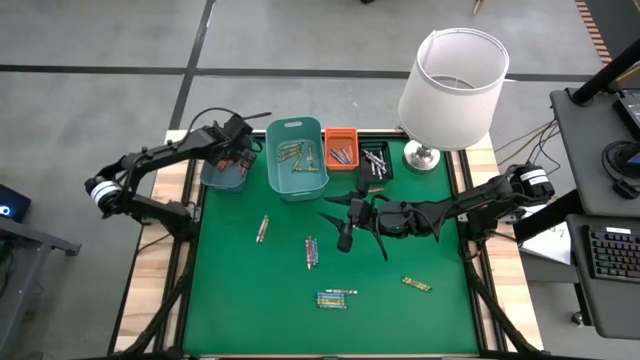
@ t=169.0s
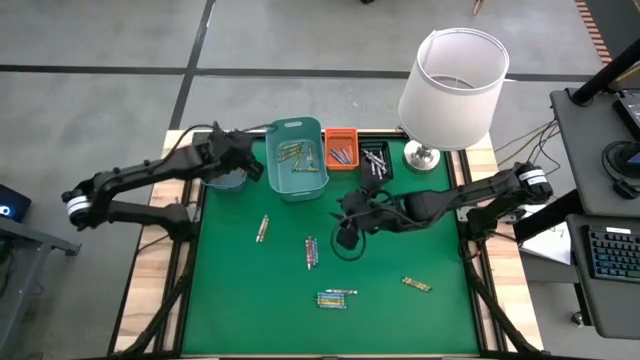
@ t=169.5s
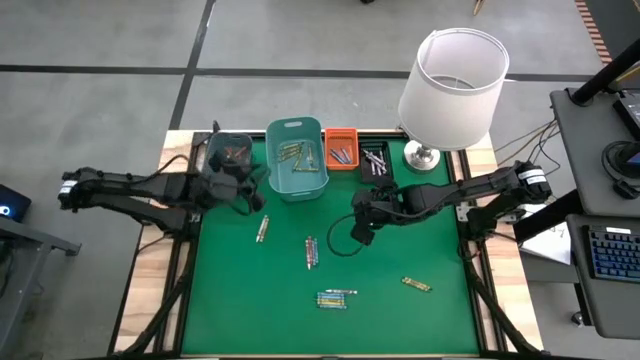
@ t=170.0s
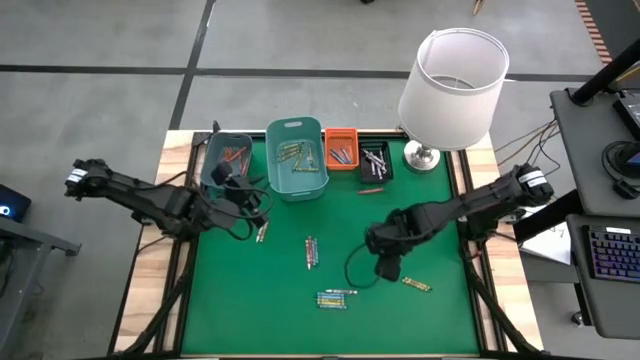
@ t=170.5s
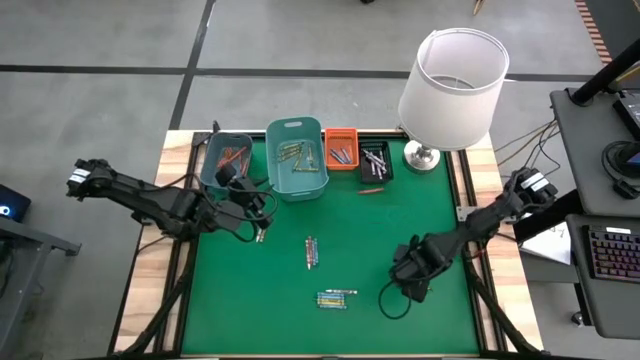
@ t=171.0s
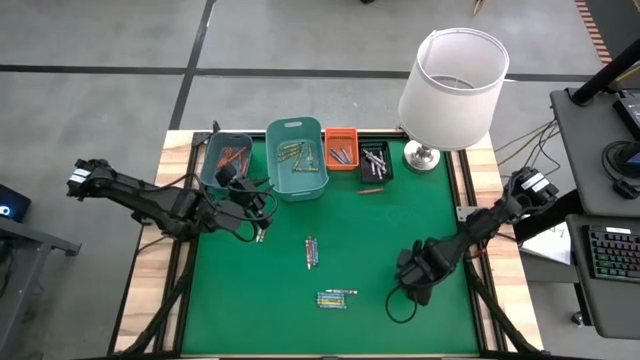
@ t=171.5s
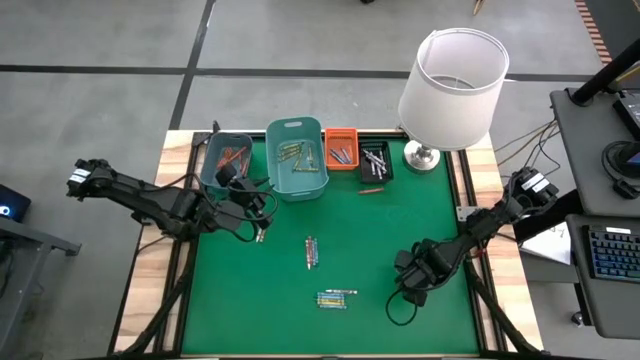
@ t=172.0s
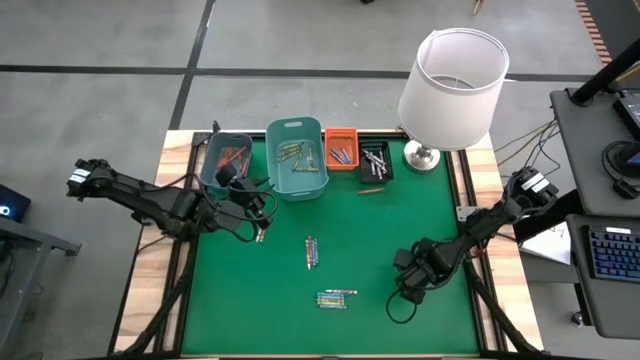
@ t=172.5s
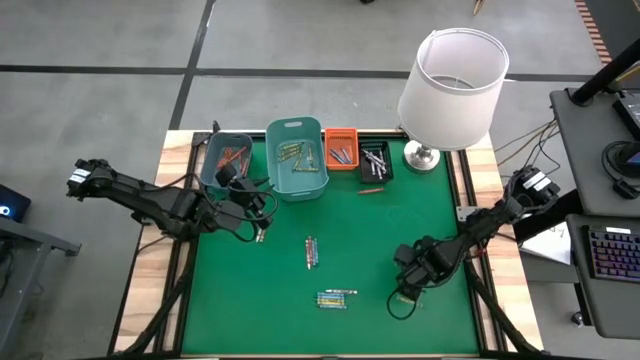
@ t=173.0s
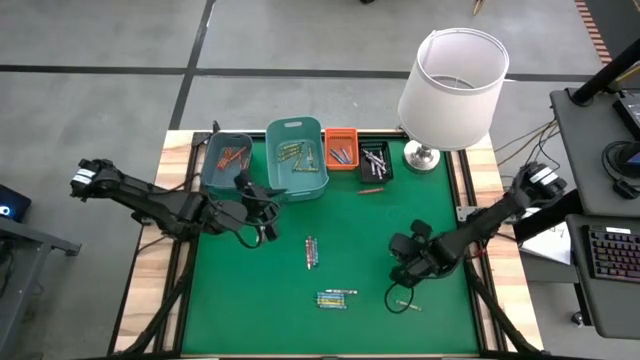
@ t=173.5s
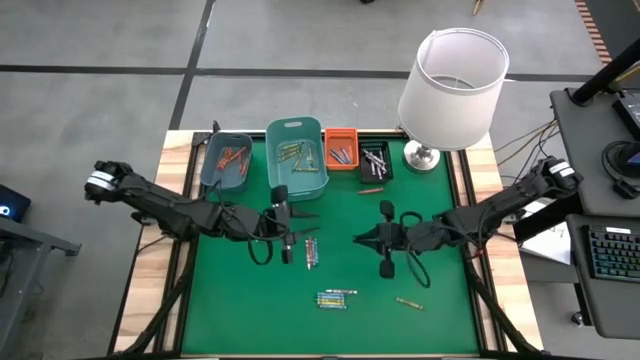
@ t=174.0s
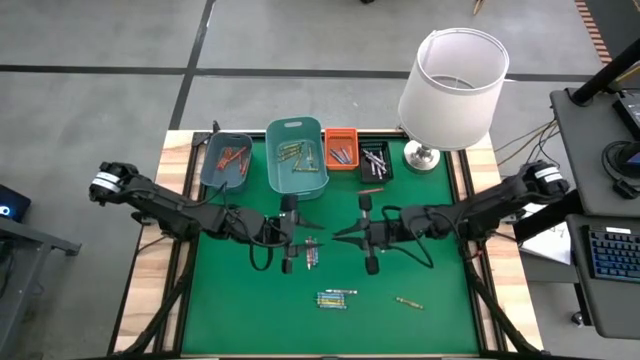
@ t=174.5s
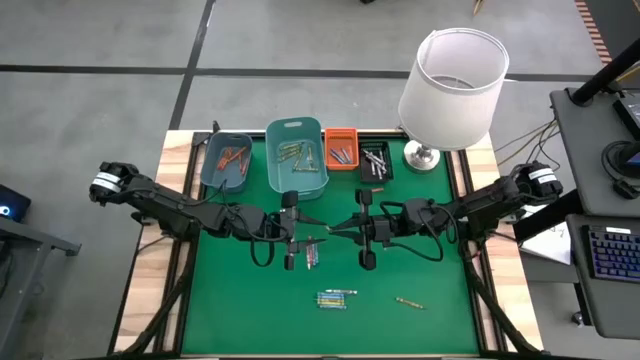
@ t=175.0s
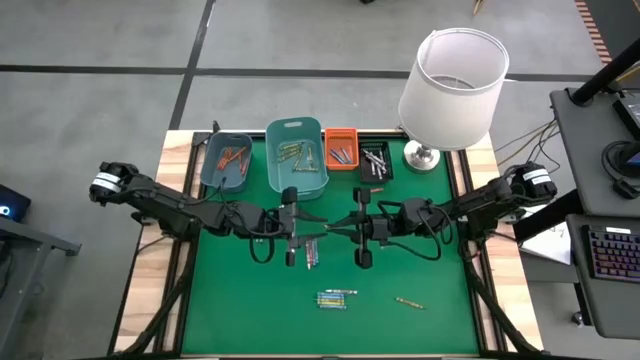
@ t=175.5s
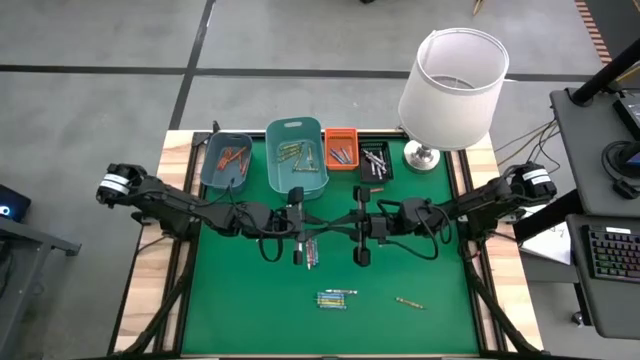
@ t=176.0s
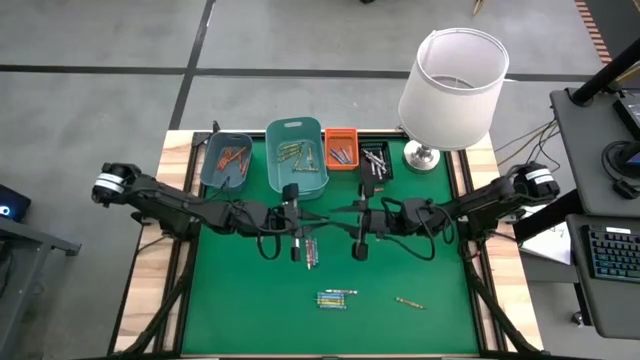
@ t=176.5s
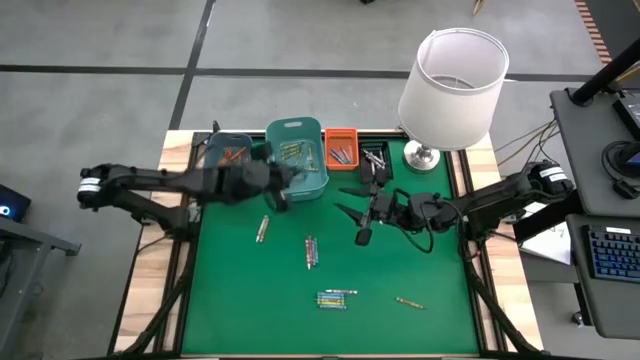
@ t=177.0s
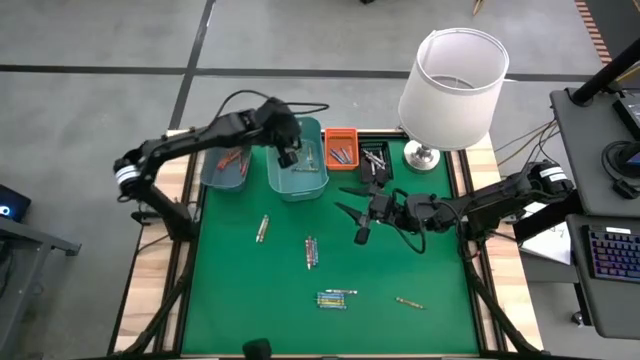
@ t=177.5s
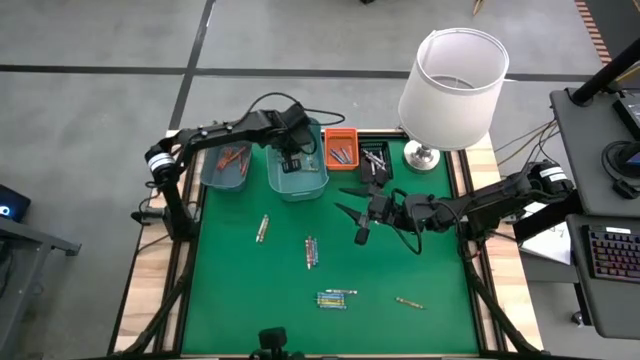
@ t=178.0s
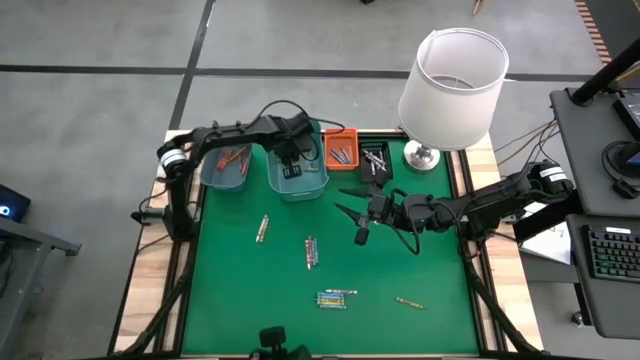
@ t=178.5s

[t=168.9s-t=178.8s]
Task: Sort crayons
Put the green crayon into the green bin

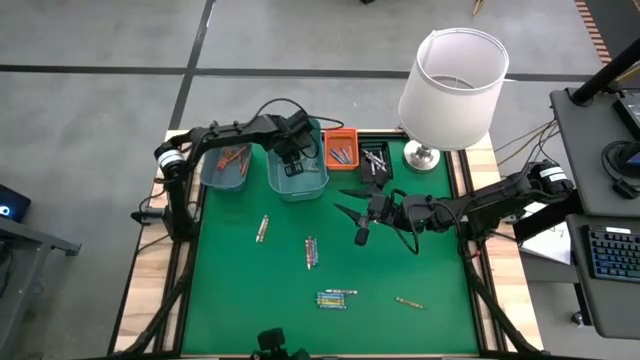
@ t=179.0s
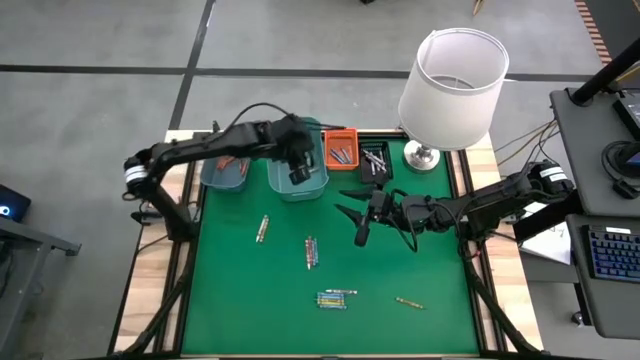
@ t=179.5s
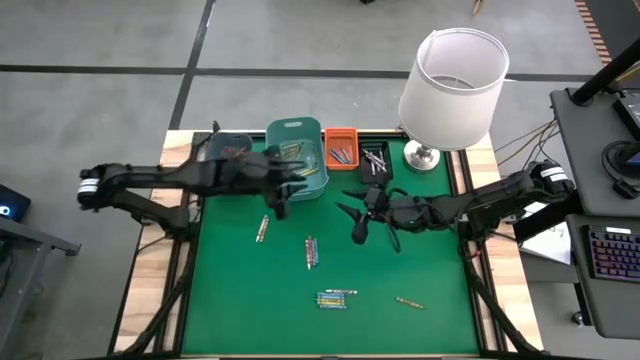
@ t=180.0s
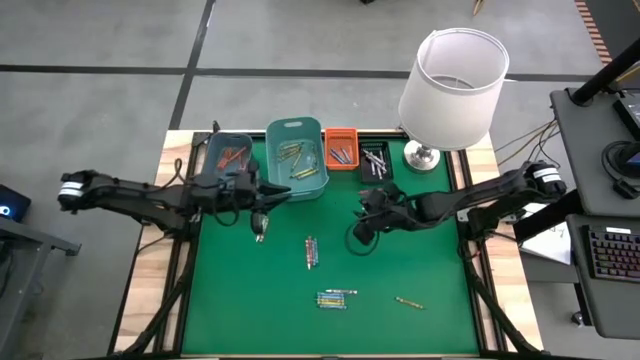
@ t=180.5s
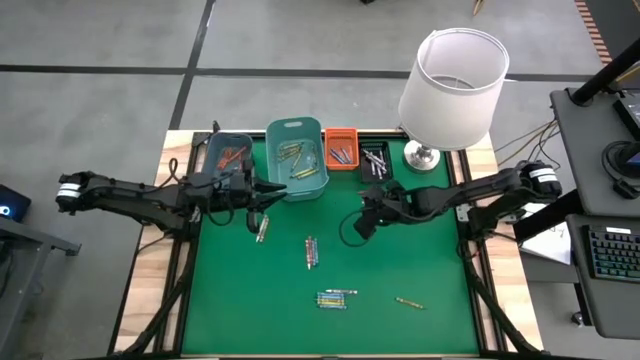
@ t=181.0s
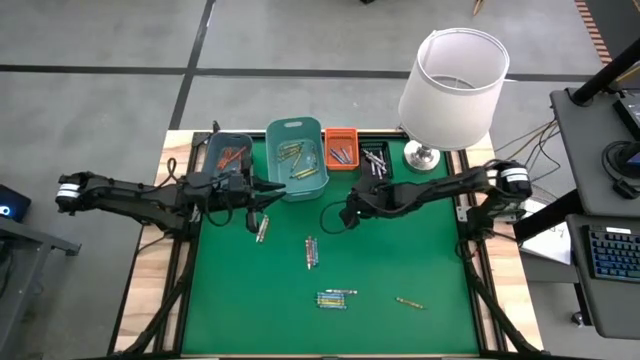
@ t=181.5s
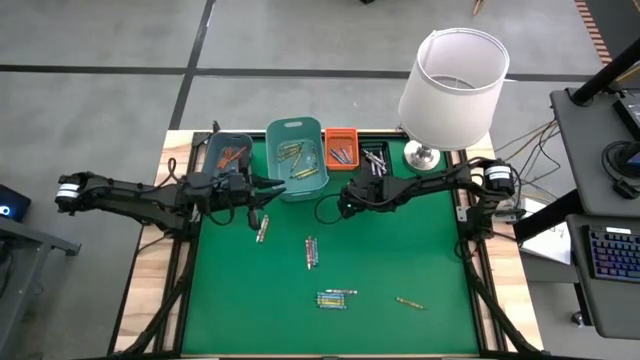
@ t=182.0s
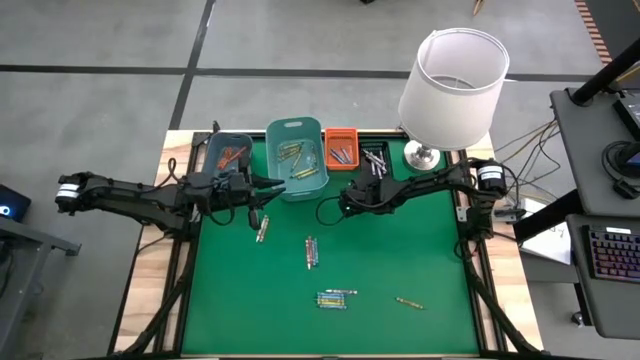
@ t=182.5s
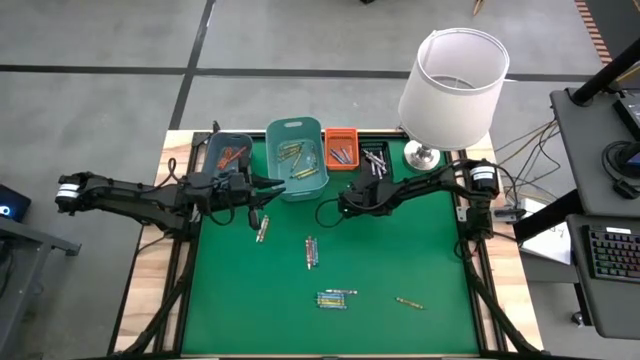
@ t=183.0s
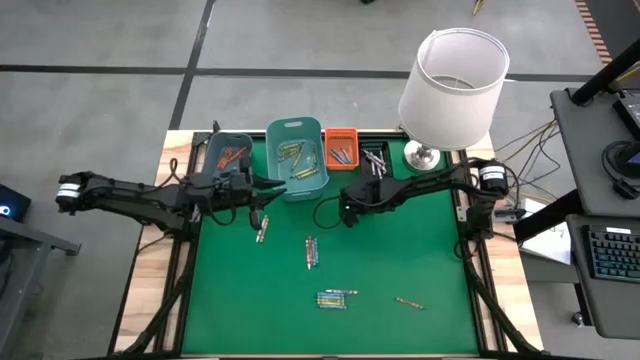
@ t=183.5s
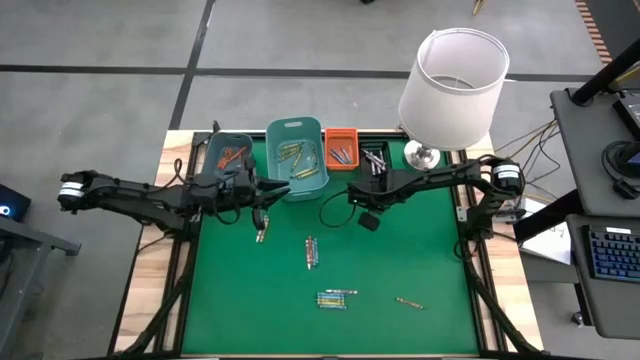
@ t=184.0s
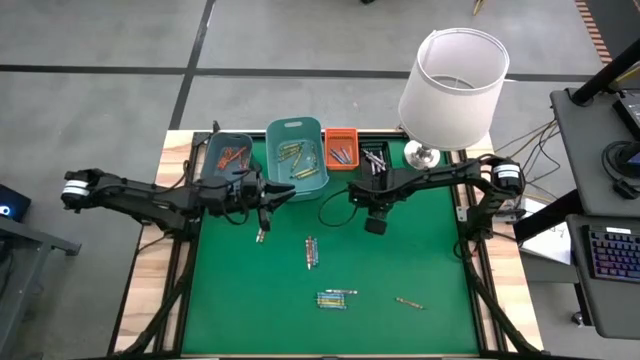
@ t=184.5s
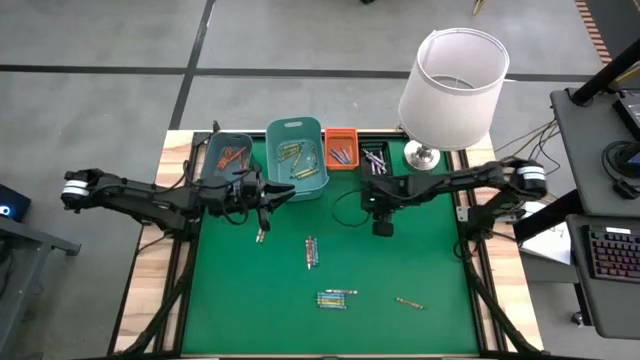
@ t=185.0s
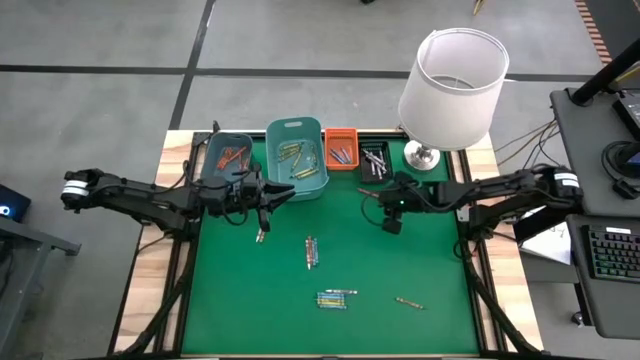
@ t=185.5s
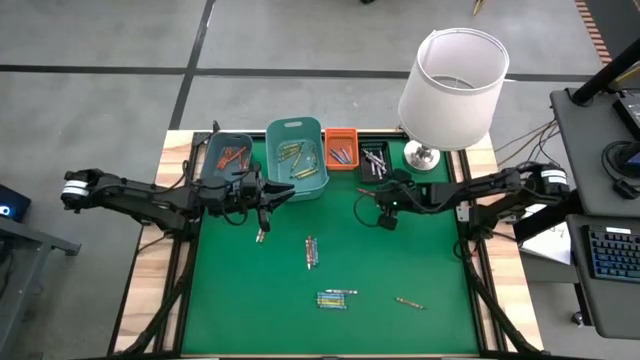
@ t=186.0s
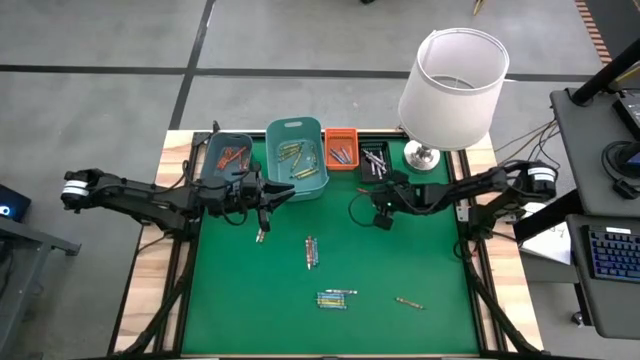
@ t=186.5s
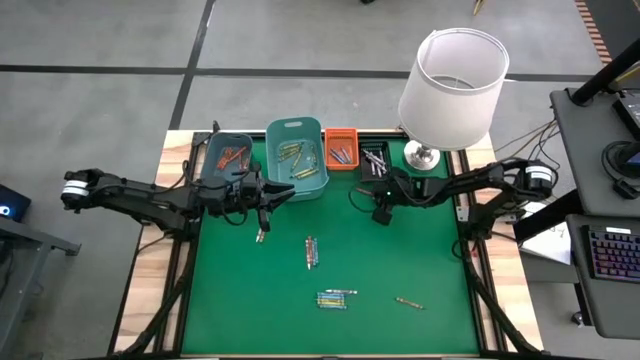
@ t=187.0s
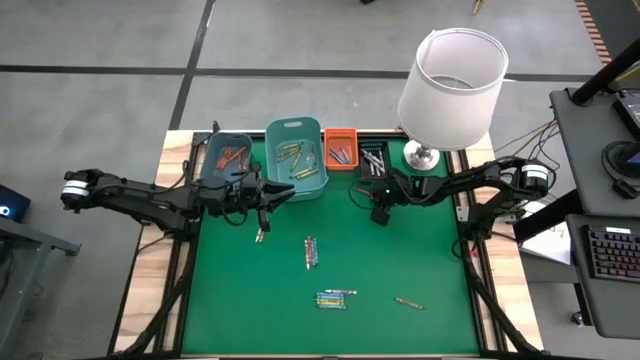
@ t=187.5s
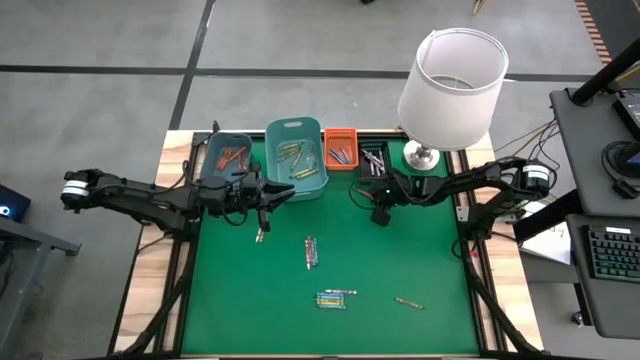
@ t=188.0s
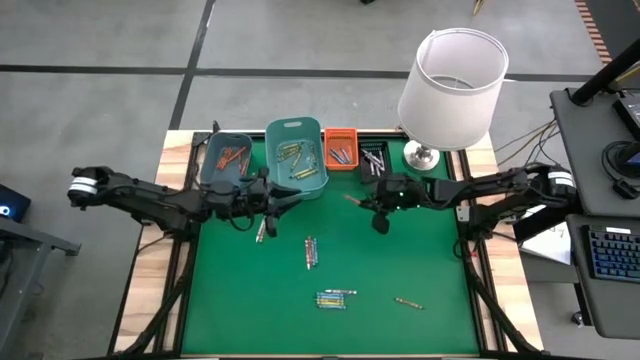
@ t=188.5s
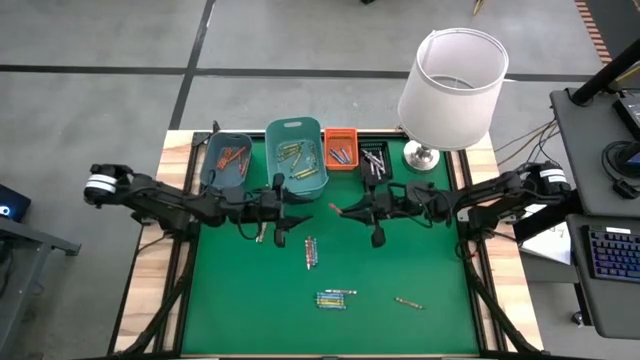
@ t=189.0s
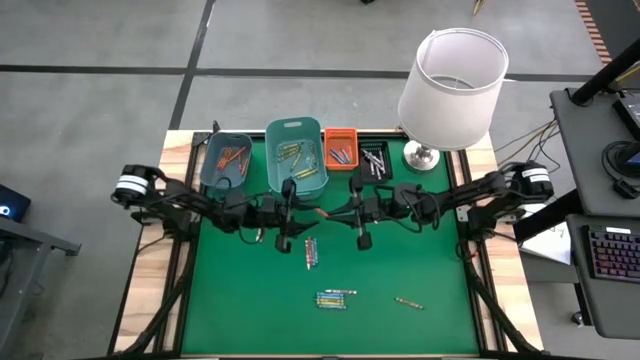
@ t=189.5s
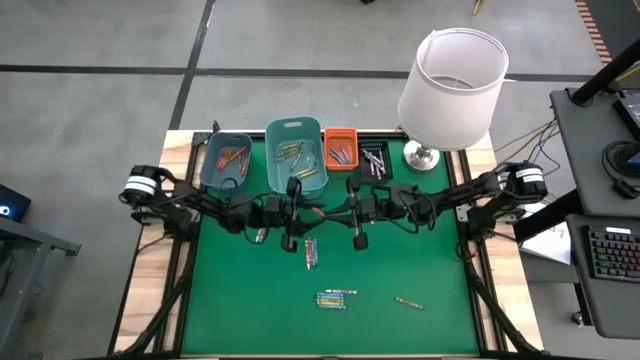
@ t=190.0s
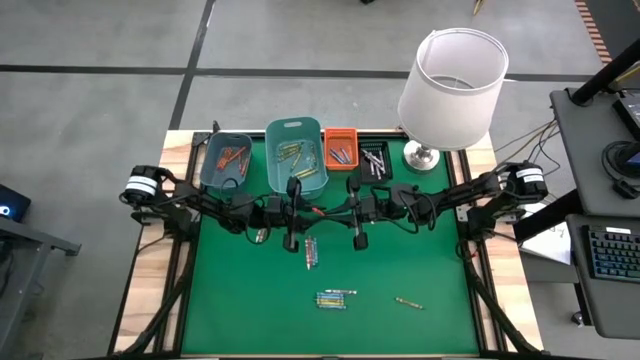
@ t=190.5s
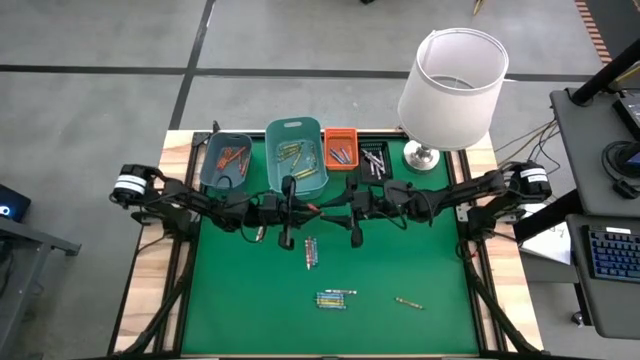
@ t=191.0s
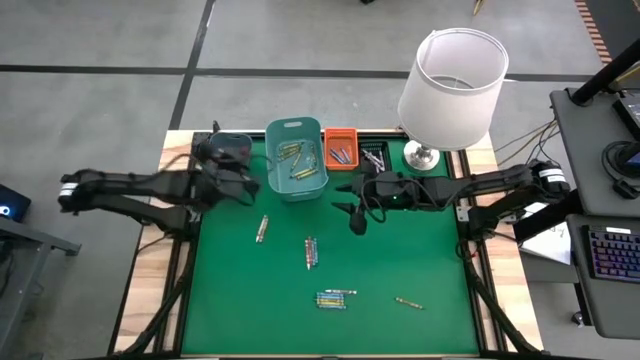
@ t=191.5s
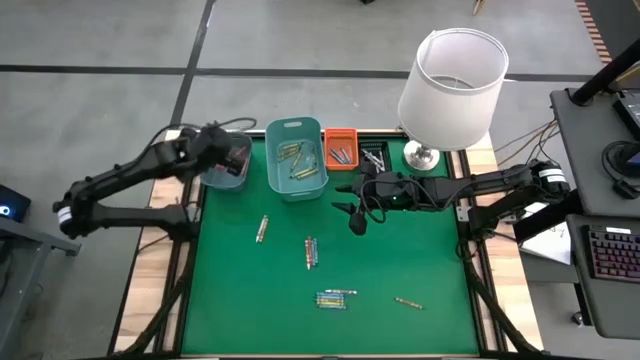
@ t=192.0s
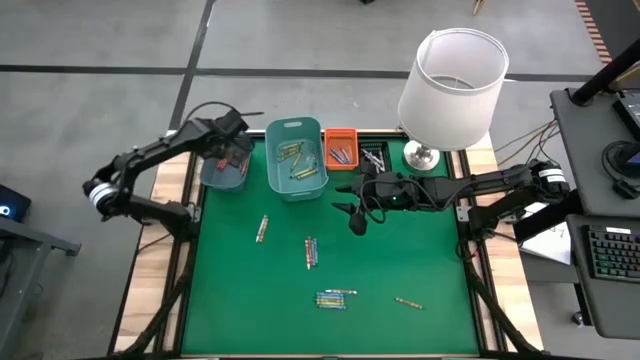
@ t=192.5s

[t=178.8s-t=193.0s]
Put the orange crayon into the blue bin
